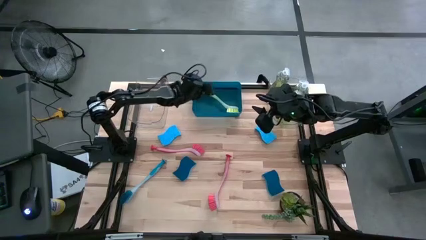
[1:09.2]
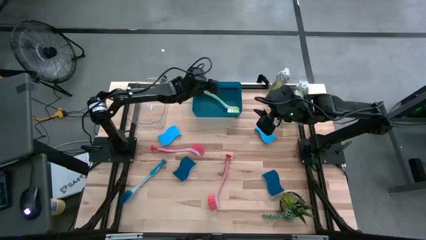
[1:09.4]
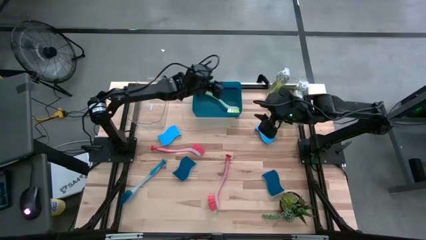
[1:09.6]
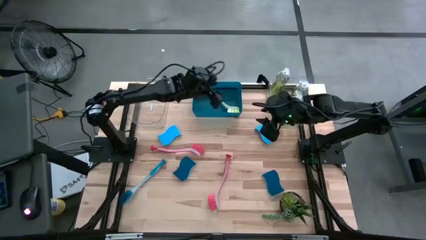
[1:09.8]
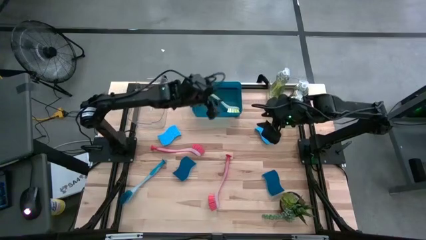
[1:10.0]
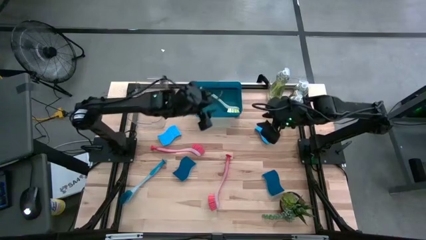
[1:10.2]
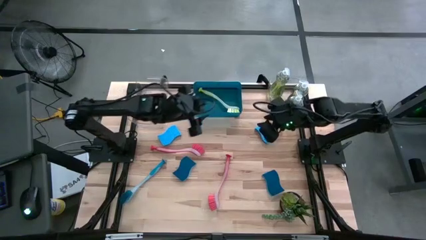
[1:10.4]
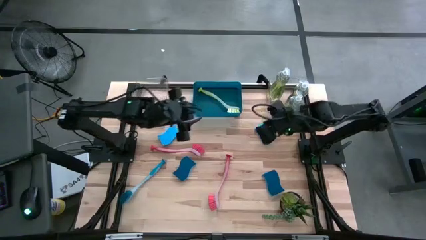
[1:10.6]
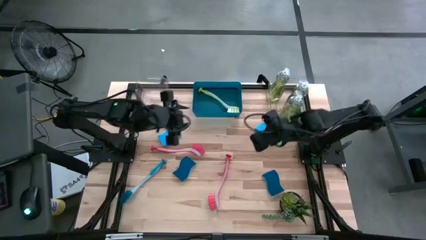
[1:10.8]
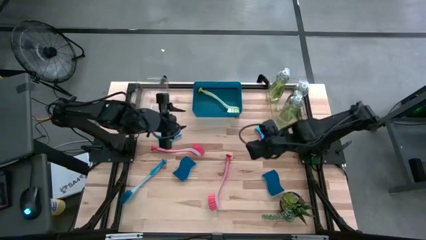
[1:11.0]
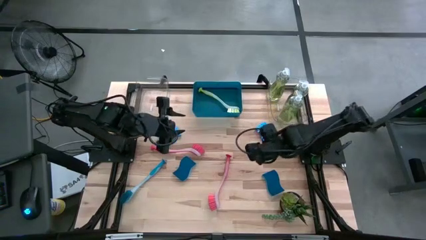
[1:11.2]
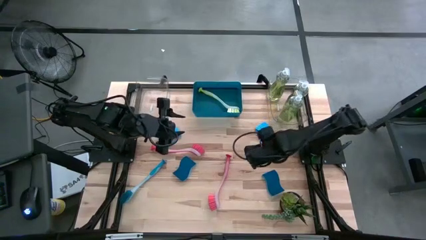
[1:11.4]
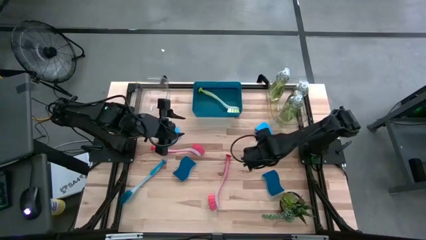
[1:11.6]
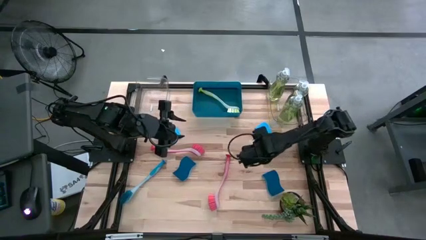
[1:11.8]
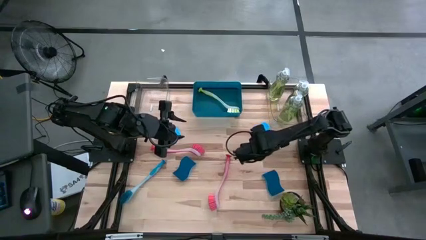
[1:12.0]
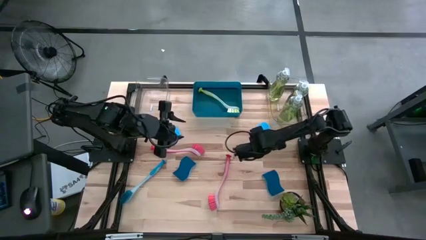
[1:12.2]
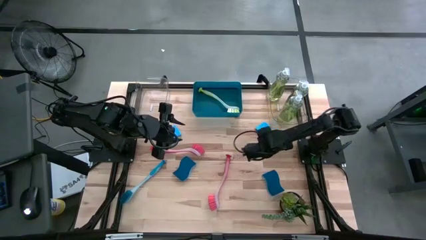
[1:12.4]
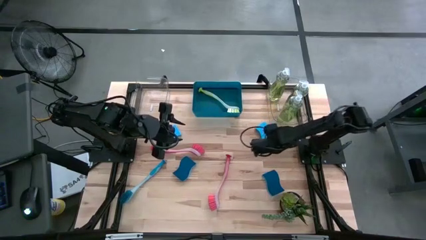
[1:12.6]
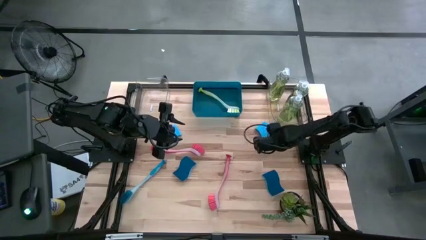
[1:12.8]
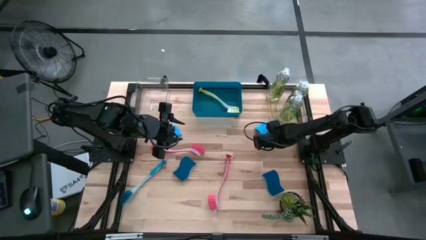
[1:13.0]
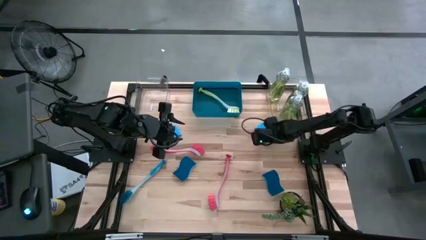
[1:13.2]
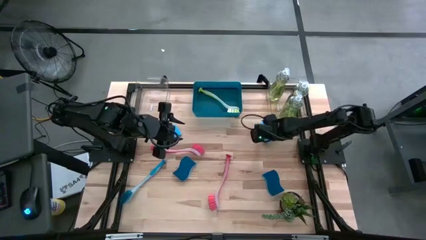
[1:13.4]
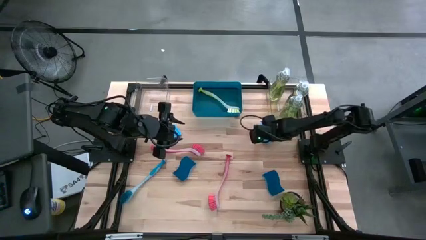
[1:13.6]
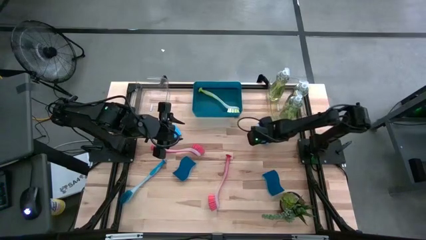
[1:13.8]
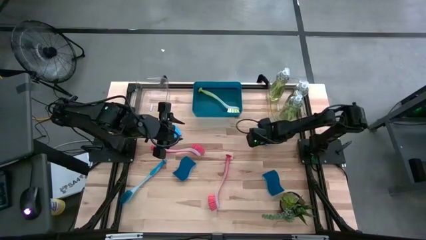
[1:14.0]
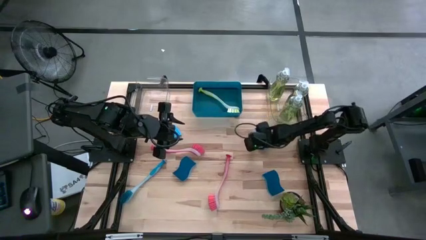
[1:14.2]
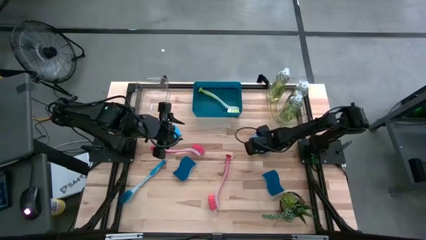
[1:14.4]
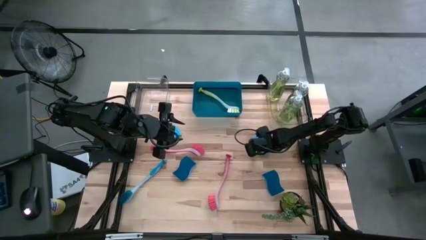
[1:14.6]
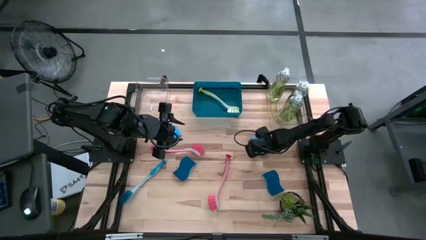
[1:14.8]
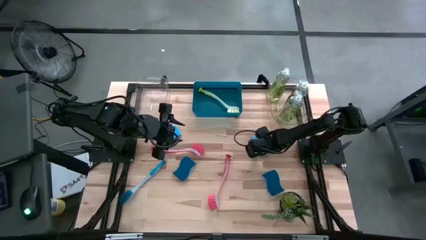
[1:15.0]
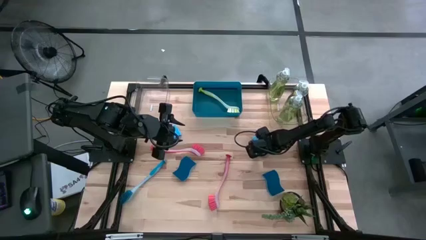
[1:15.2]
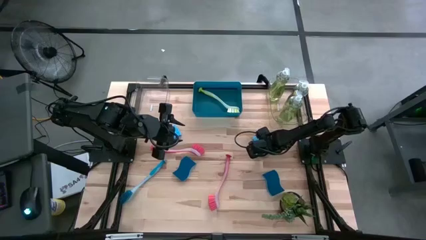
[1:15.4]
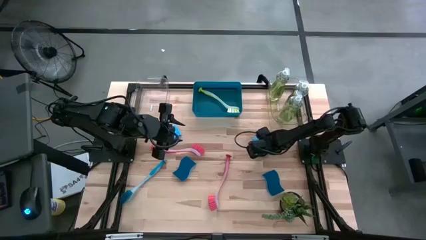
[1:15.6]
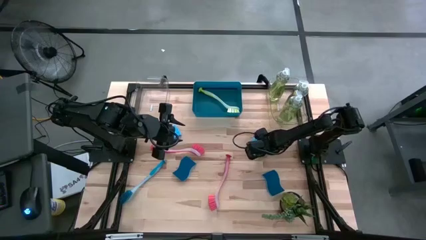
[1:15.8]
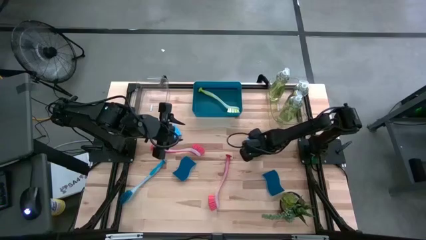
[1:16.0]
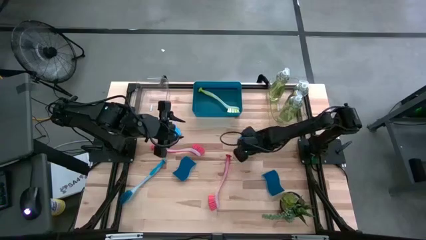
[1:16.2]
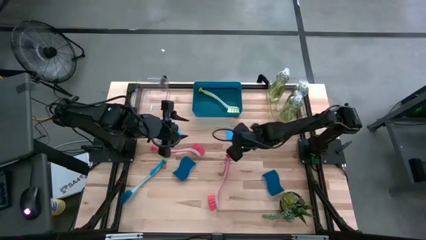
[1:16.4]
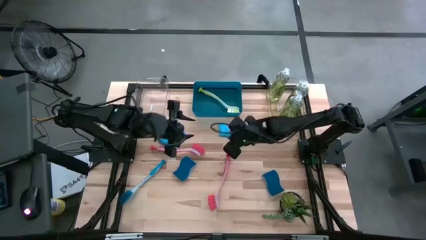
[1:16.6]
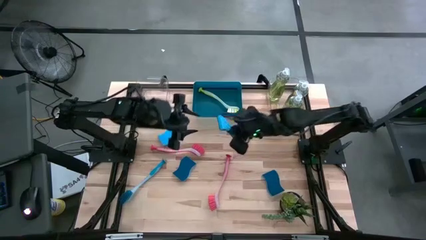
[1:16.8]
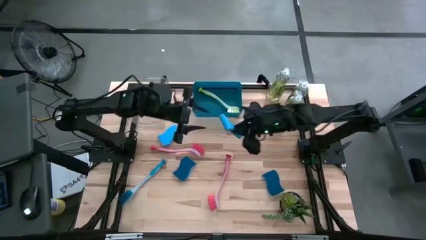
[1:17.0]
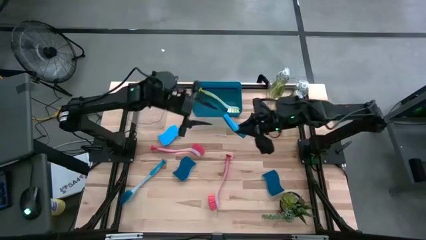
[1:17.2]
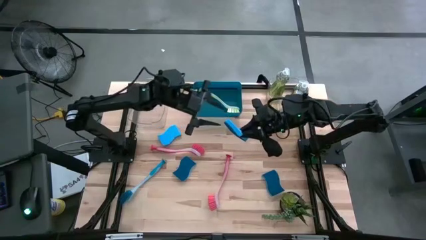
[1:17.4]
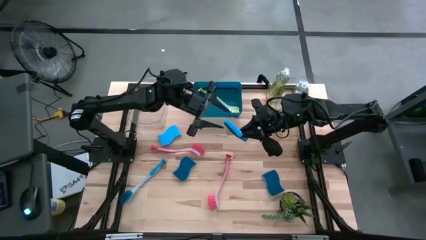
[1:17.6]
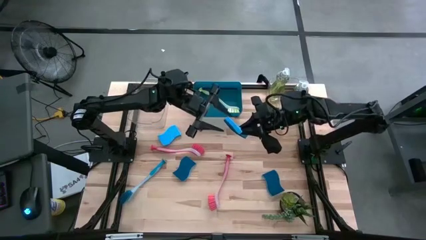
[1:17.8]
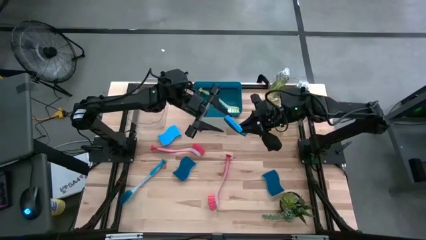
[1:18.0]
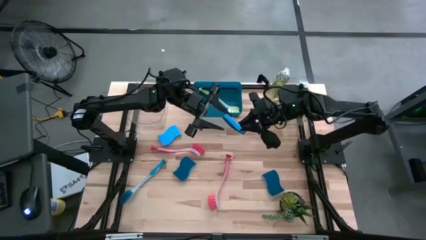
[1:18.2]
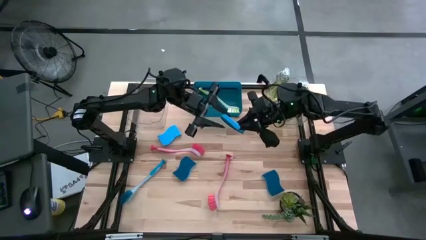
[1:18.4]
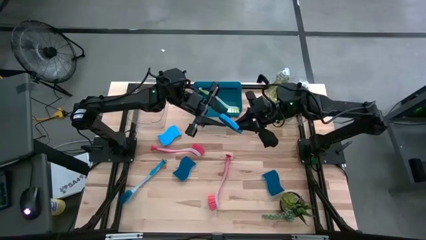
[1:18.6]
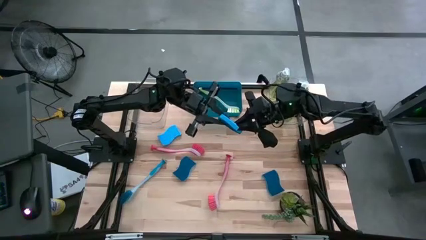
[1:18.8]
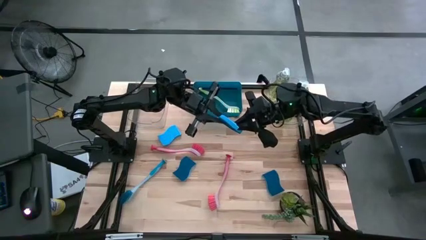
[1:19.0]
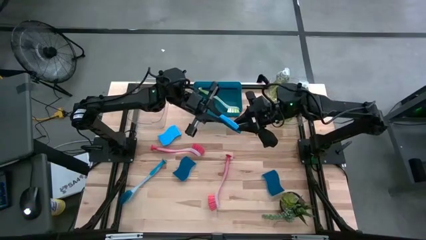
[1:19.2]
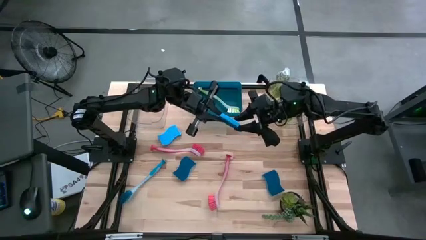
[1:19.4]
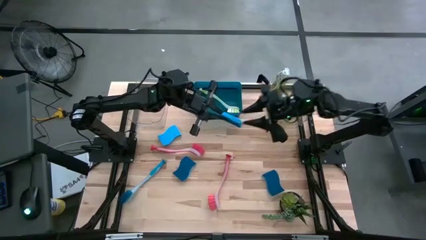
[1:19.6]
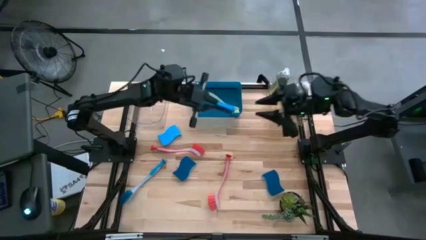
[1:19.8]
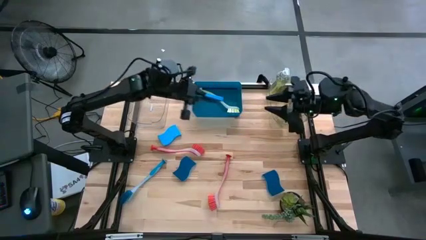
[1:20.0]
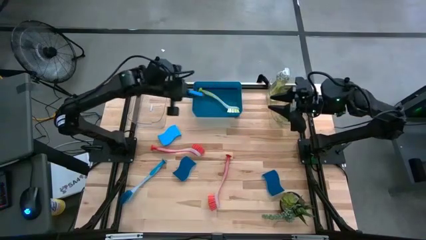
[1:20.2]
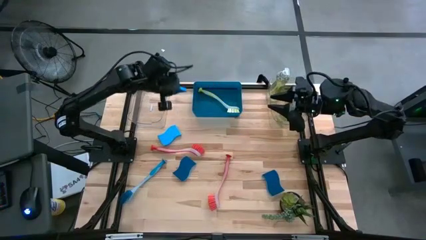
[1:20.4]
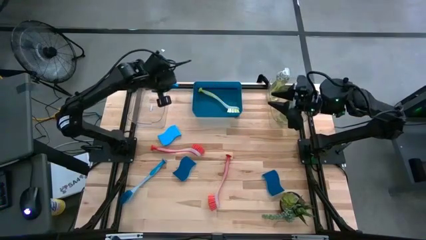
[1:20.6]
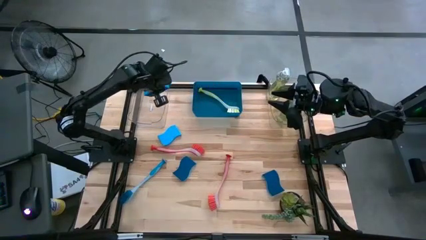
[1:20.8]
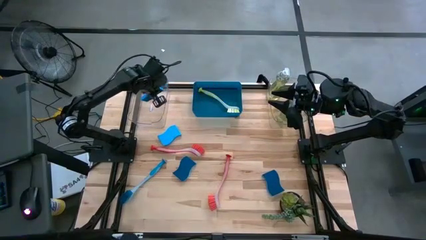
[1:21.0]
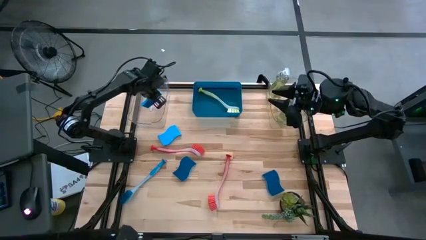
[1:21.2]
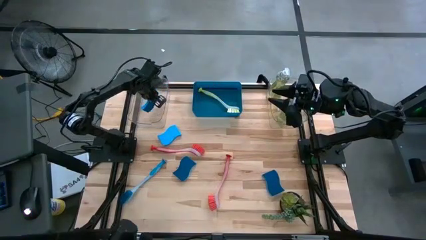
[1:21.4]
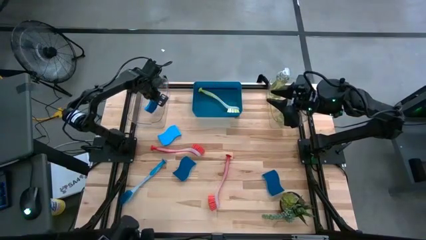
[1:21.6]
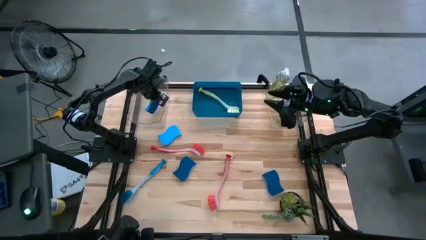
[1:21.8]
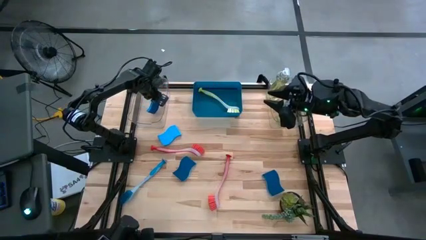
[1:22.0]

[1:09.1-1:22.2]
Task: Pick & Place Kitchen Sink Supplies
Put the top right blue sponge into the left transparent bin

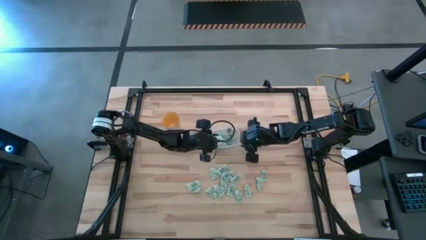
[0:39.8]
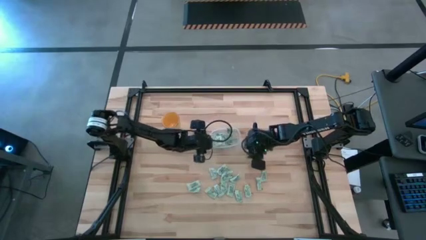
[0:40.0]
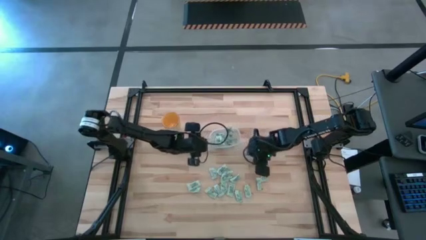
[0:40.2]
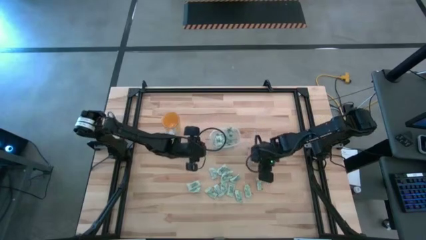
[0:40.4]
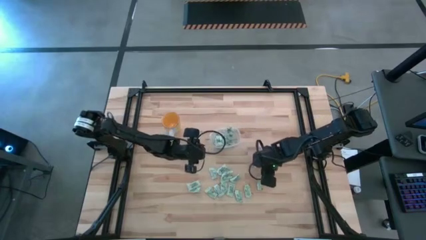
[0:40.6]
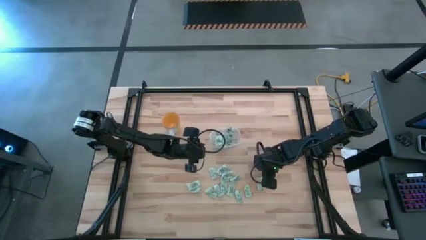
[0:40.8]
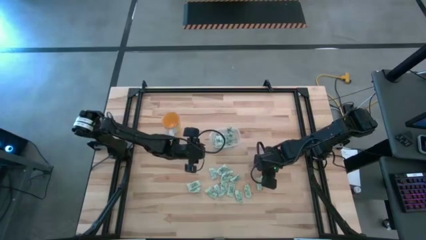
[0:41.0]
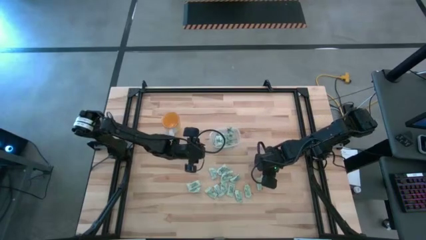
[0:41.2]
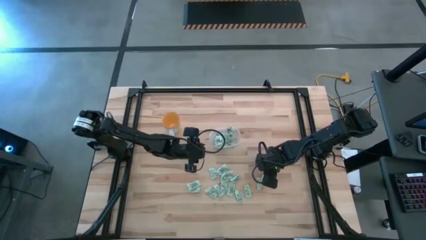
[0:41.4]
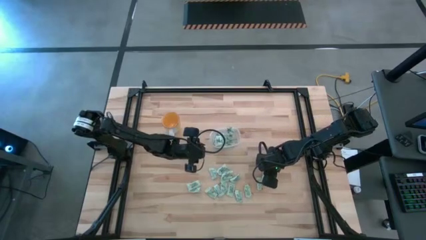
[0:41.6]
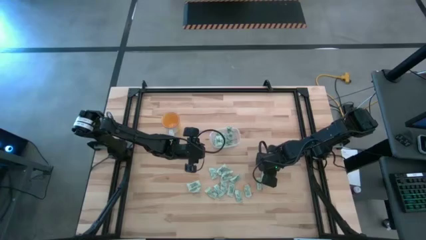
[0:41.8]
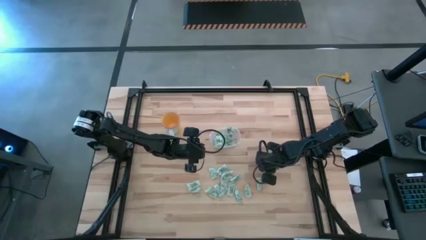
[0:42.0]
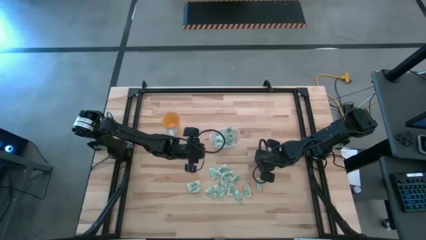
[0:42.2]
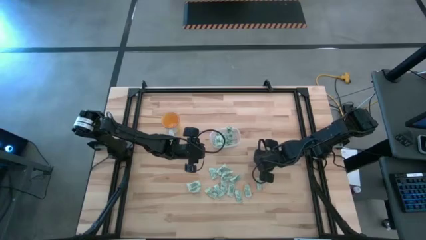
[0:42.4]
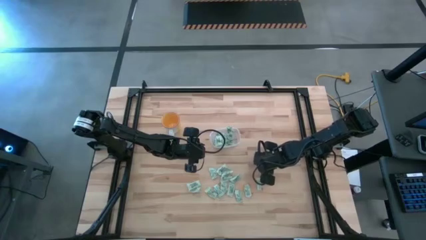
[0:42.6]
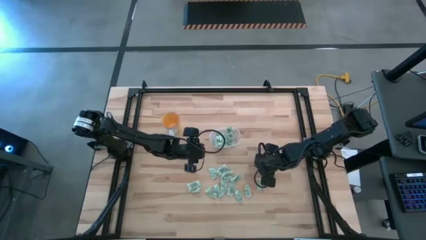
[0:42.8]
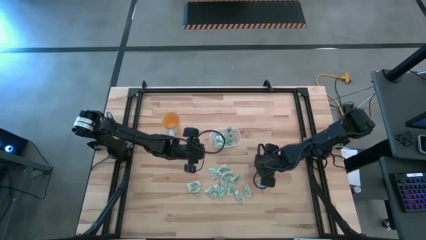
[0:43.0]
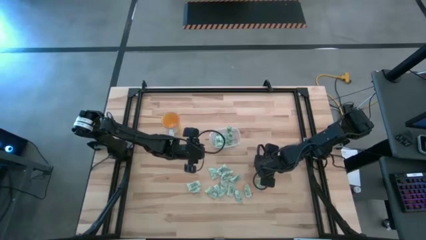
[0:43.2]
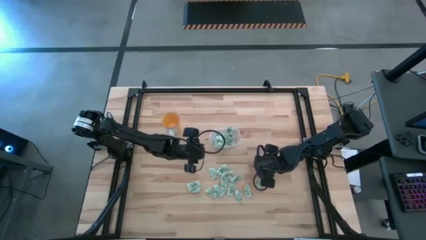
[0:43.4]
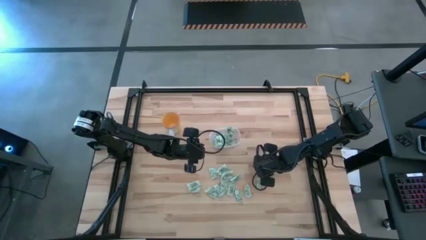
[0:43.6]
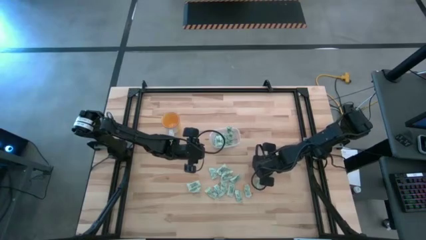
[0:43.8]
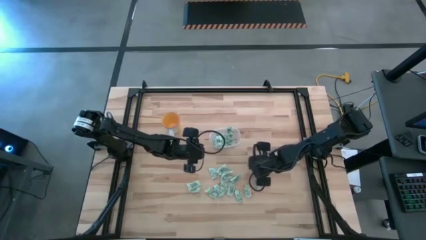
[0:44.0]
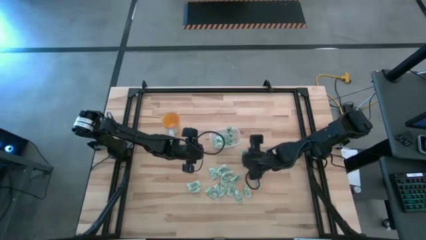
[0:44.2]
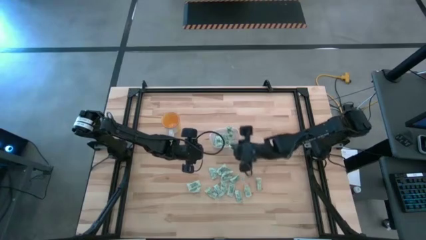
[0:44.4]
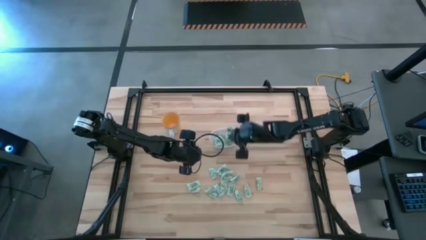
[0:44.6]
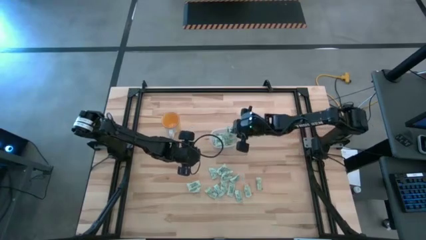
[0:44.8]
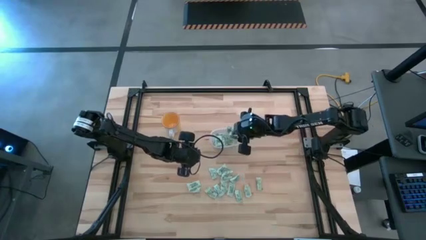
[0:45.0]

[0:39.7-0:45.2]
Task: Pick and place Stevia / Truvia into bins
Put the stevia packet into the transparent bin
